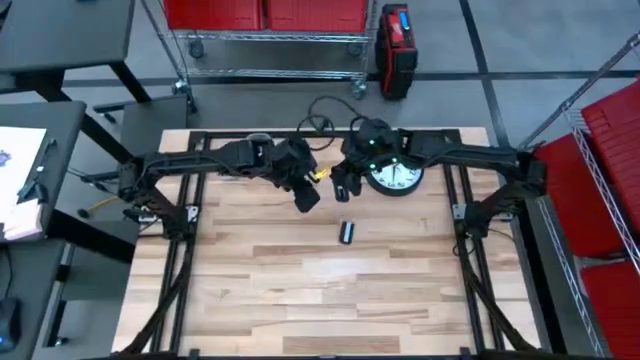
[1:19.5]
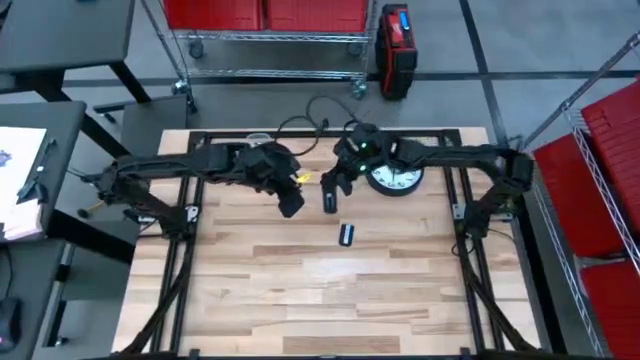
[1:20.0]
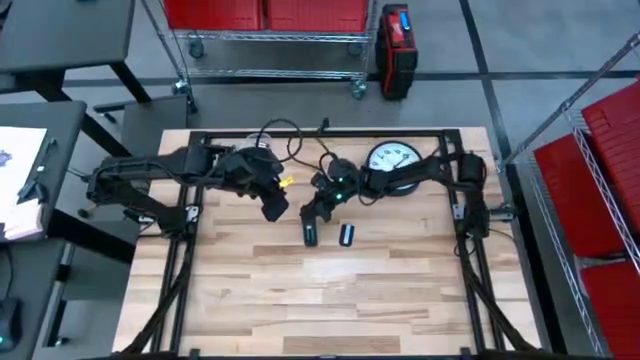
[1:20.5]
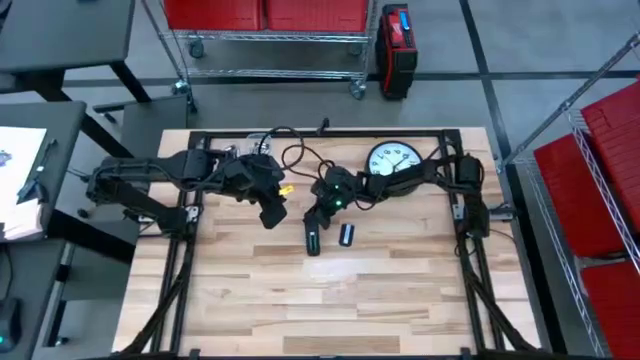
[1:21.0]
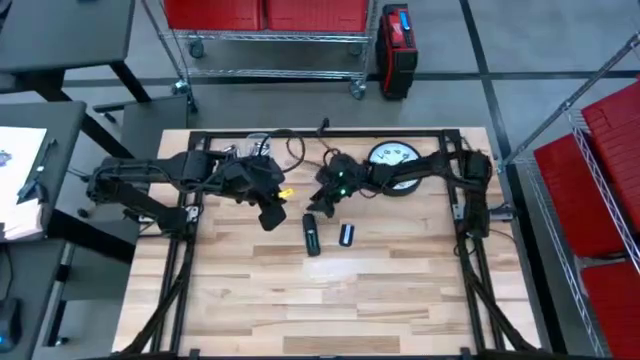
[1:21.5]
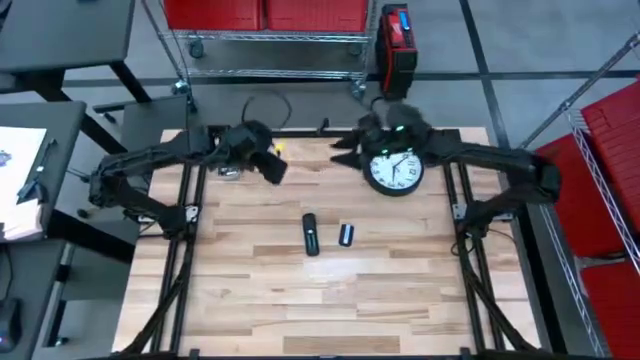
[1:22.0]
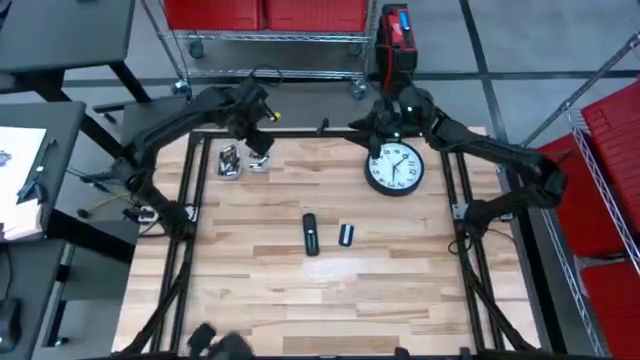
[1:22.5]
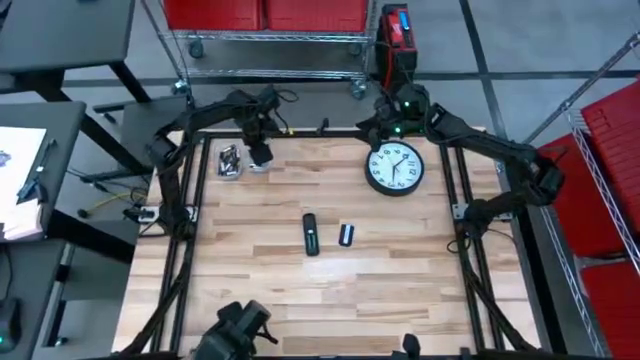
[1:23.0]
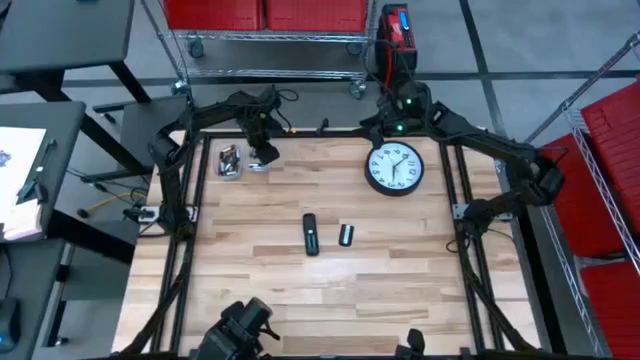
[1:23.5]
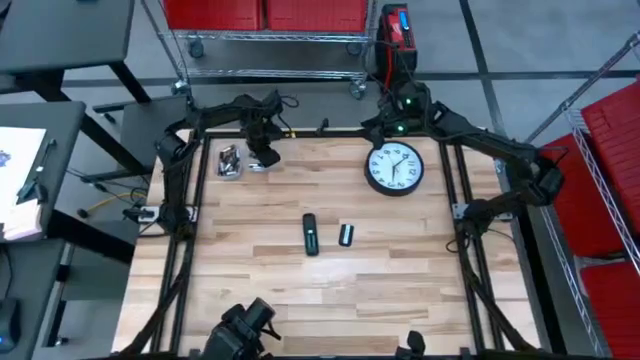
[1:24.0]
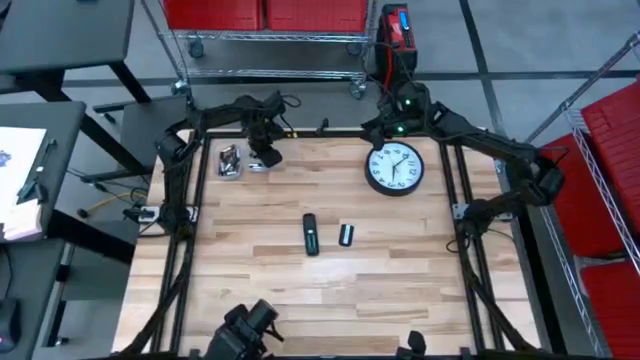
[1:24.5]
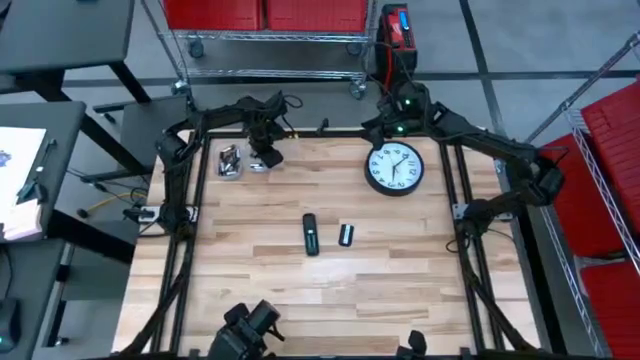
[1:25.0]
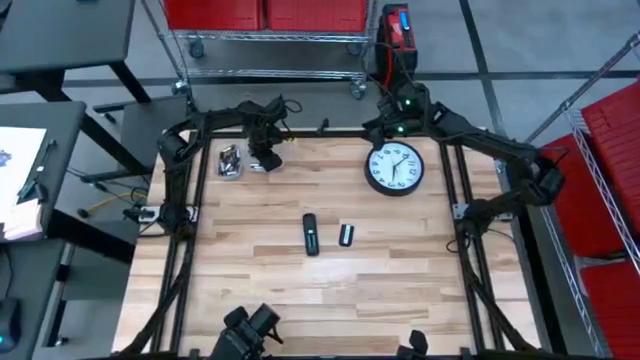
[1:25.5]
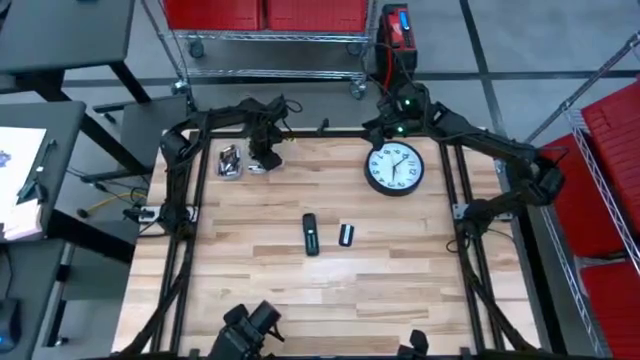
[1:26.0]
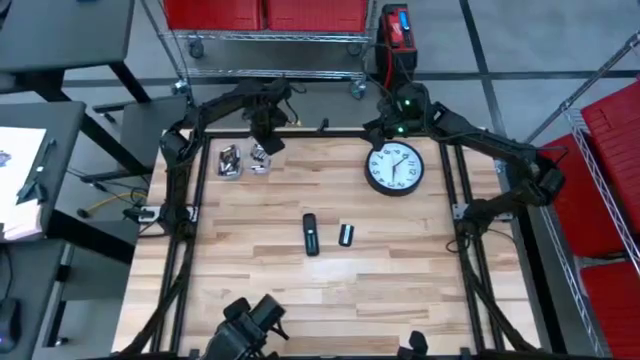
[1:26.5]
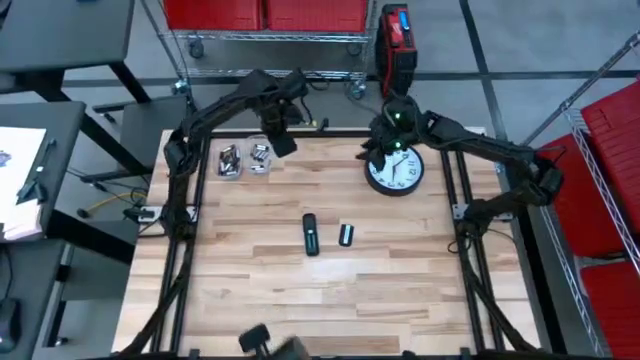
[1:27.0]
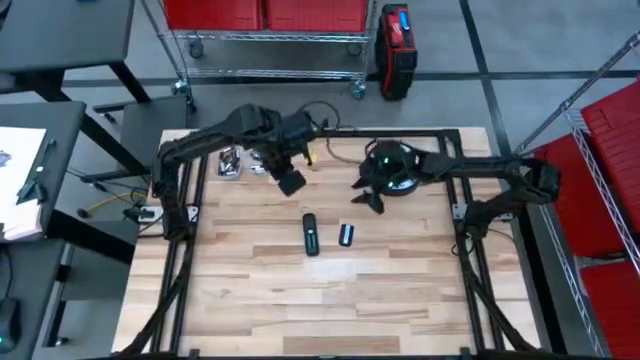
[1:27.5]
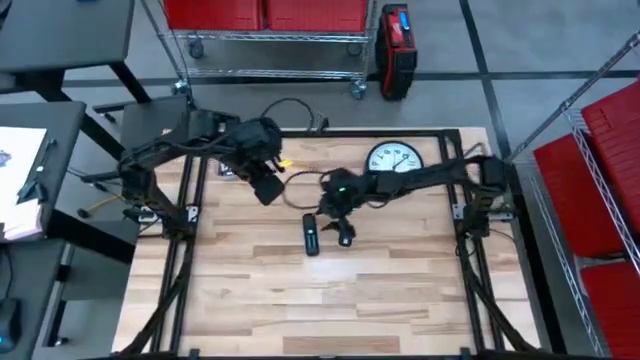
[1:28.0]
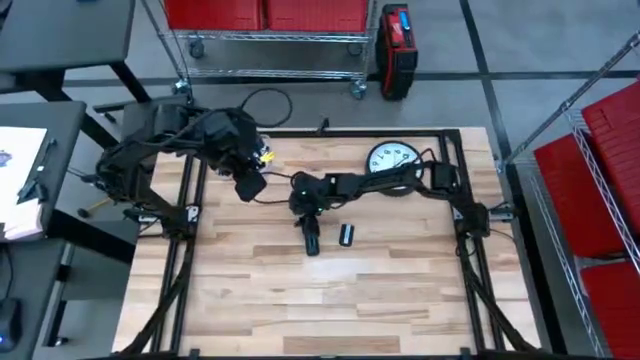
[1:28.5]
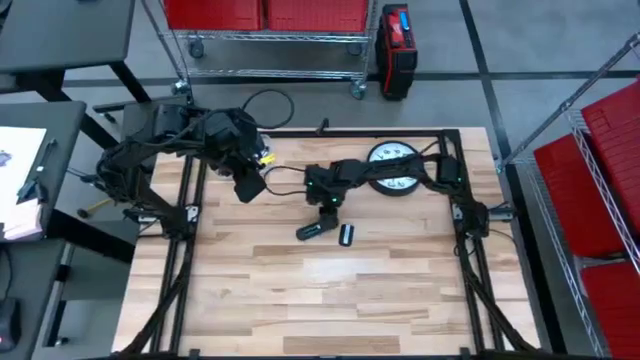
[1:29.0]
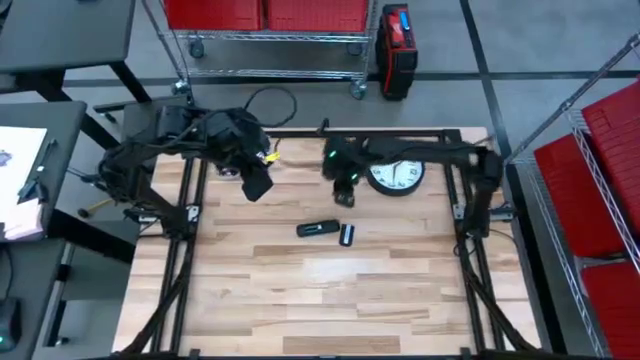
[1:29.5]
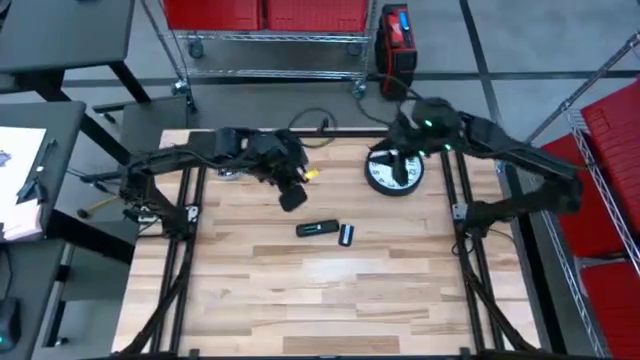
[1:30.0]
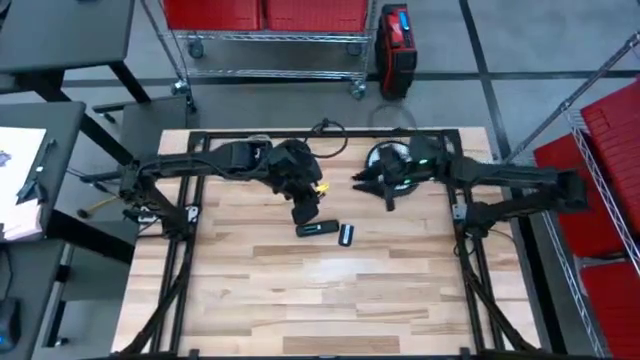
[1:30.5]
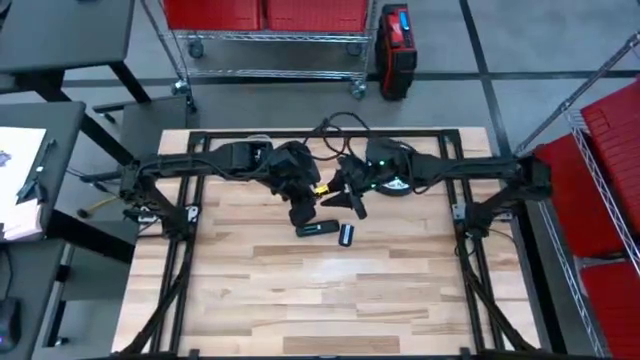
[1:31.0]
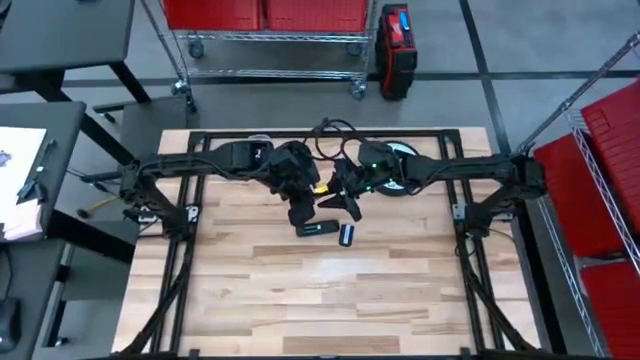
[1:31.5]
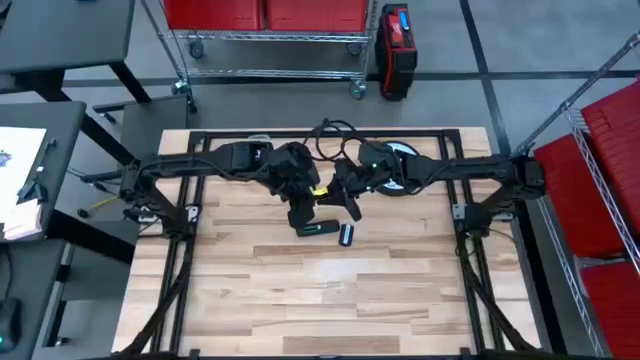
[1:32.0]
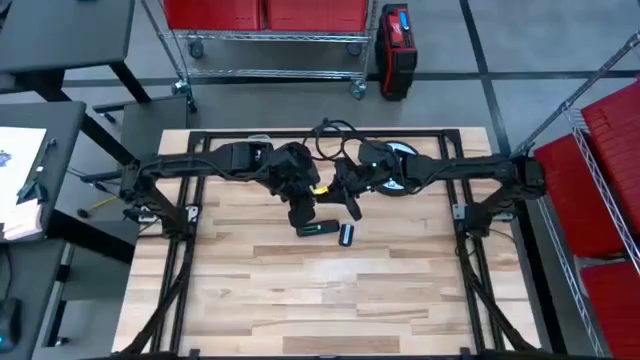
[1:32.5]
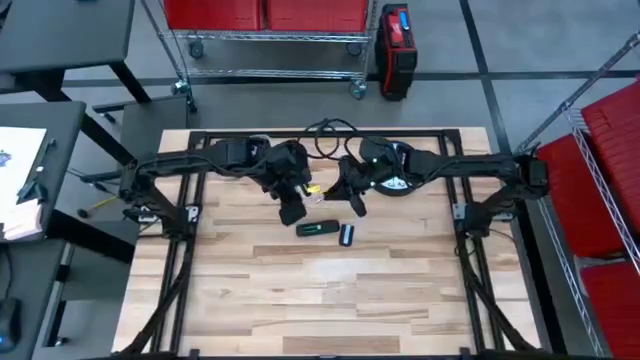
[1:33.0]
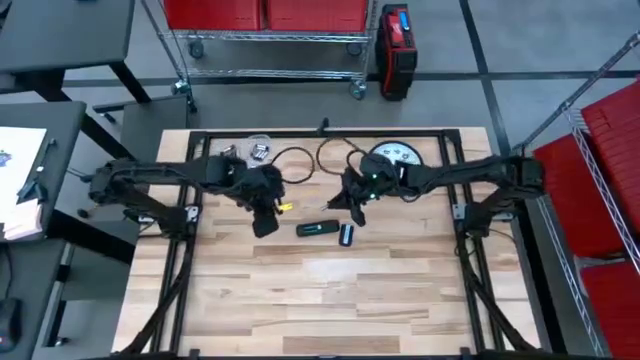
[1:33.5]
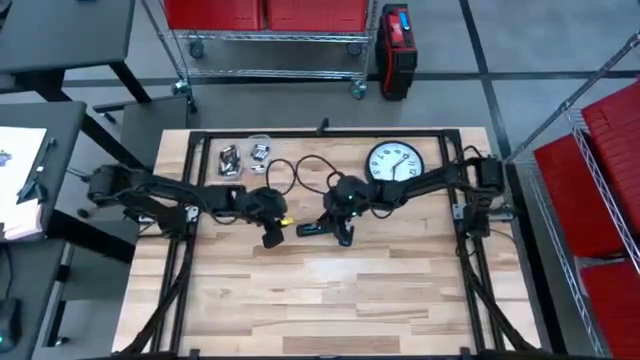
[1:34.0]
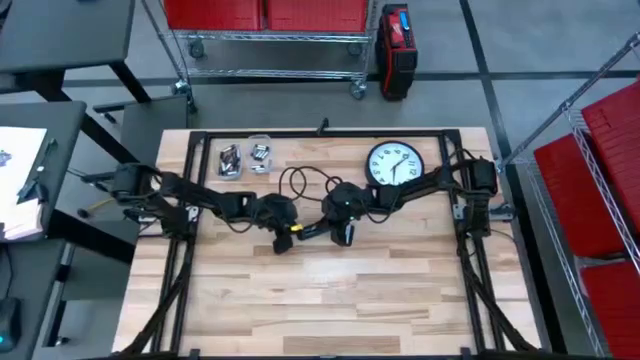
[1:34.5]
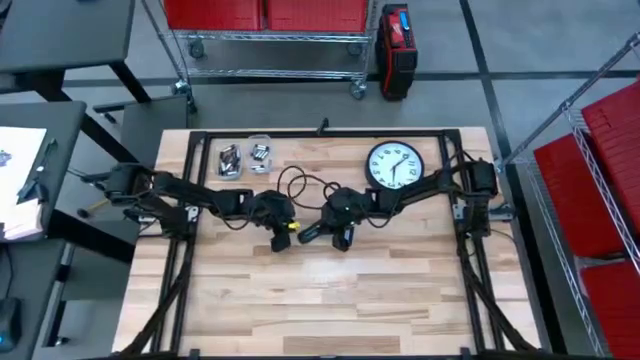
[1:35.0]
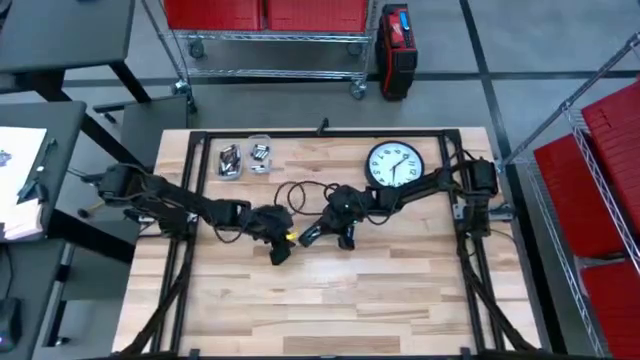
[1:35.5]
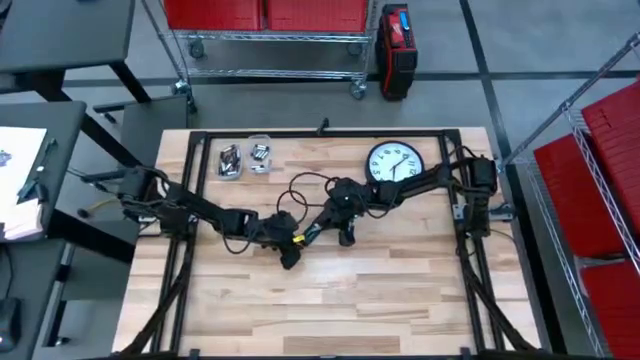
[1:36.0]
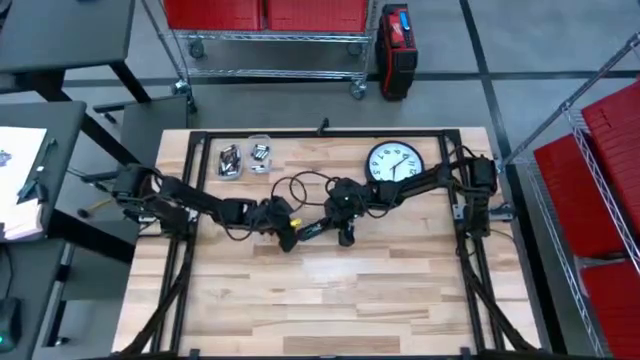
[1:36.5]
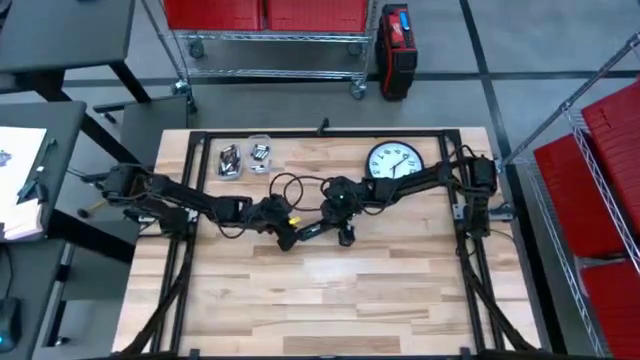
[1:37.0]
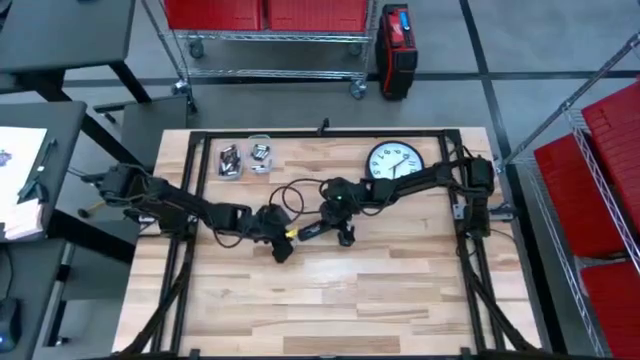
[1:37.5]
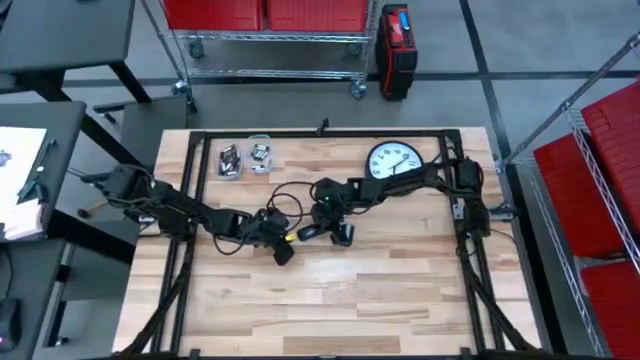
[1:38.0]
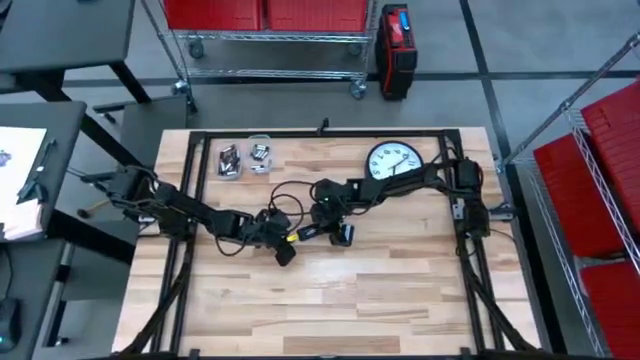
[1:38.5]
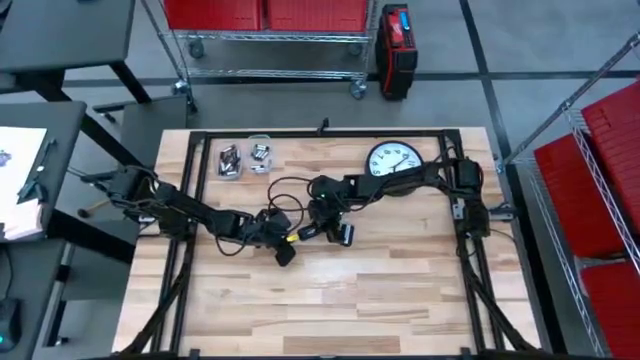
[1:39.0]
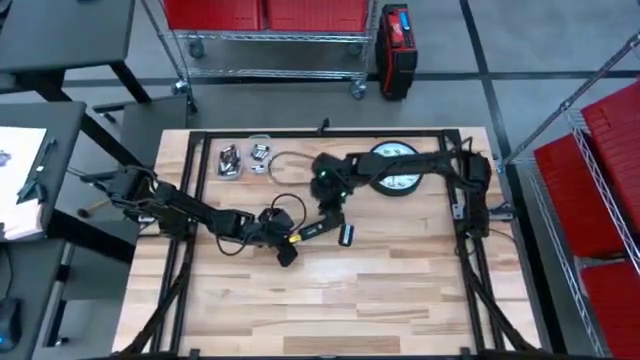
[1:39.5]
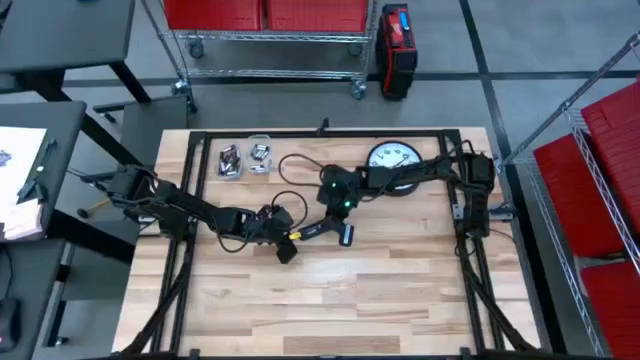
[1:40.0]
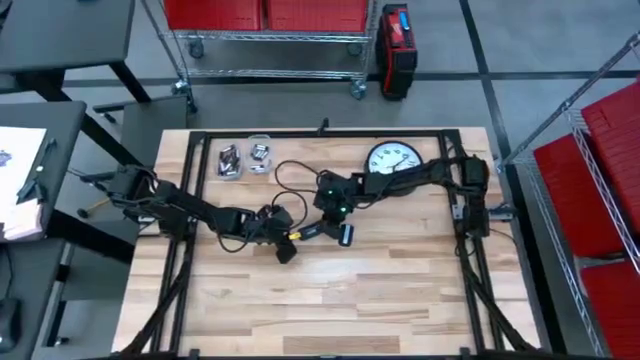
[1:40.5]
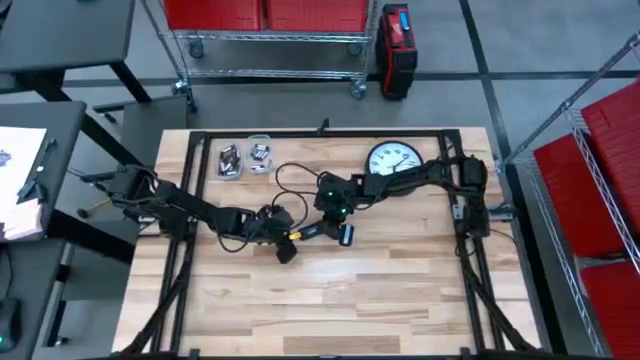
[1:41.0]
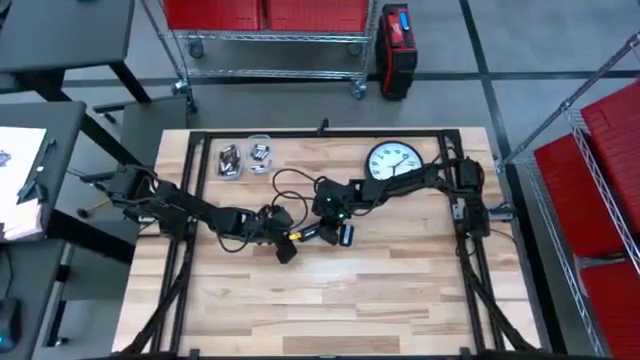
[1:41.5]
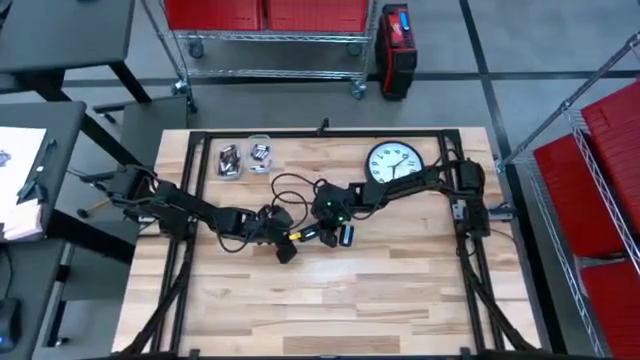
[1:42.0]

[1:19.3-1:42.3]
Task: Insert battery
Insert the silver battery into the remote battery compartment
